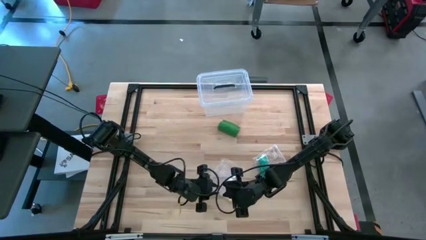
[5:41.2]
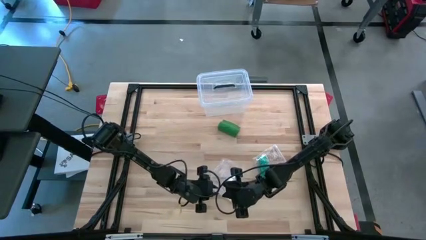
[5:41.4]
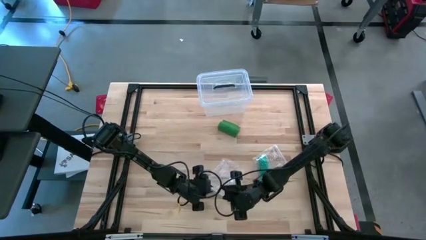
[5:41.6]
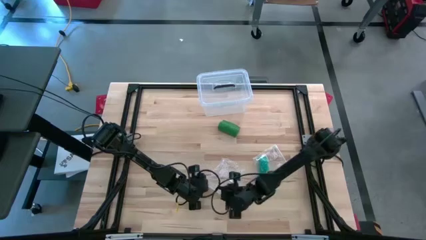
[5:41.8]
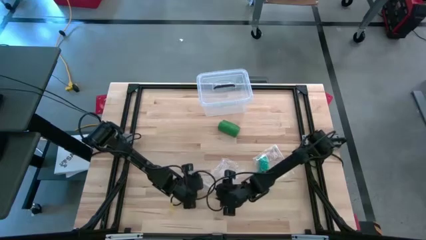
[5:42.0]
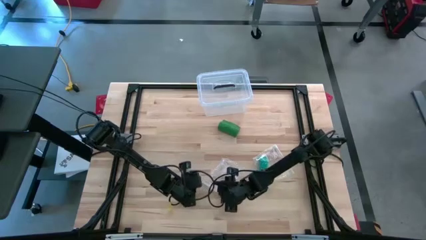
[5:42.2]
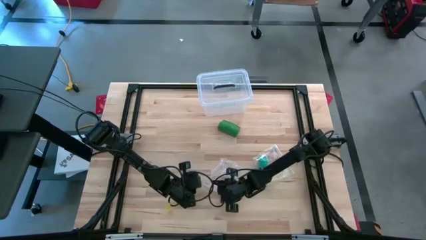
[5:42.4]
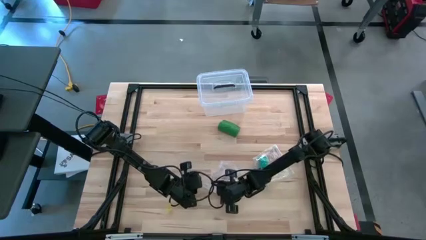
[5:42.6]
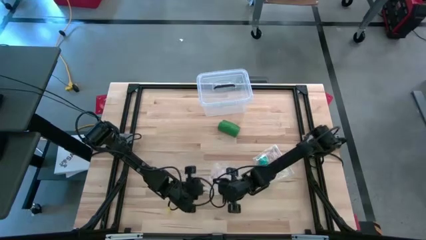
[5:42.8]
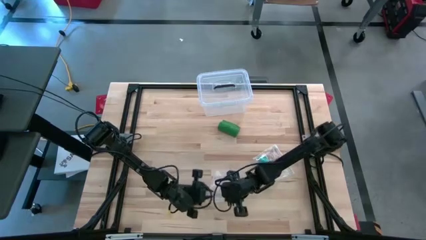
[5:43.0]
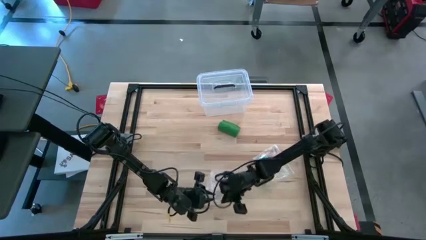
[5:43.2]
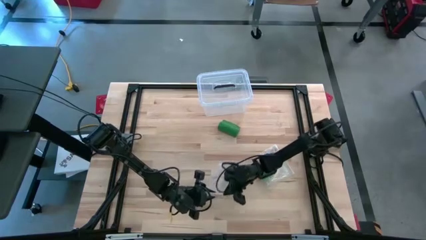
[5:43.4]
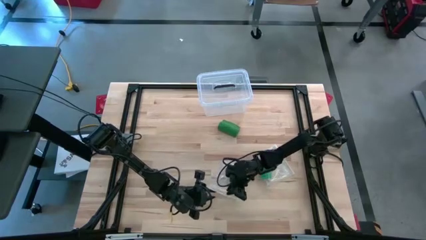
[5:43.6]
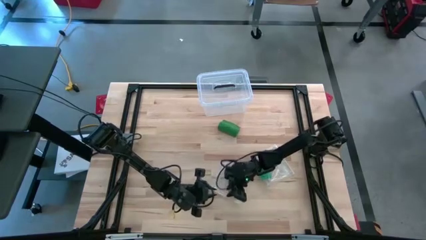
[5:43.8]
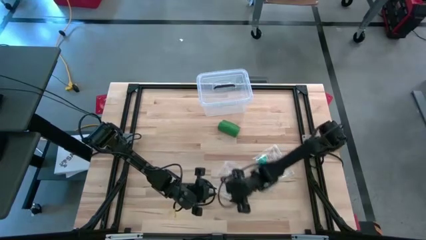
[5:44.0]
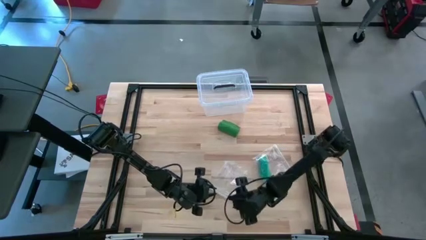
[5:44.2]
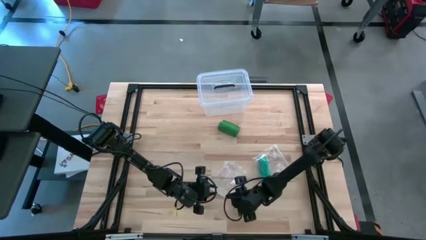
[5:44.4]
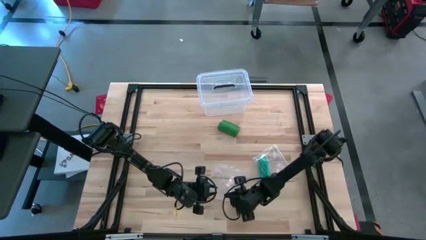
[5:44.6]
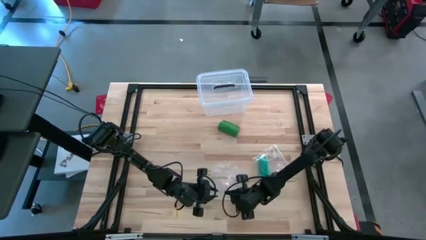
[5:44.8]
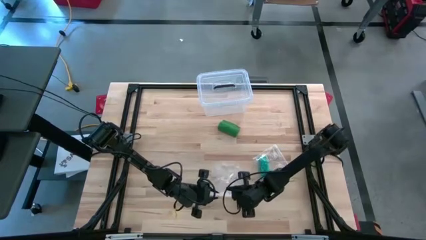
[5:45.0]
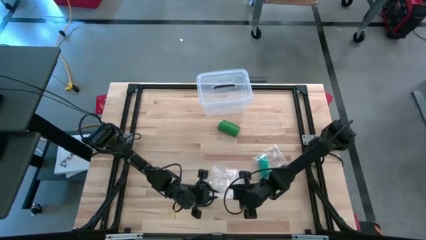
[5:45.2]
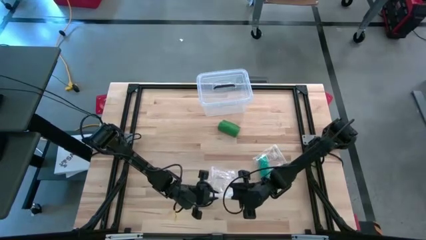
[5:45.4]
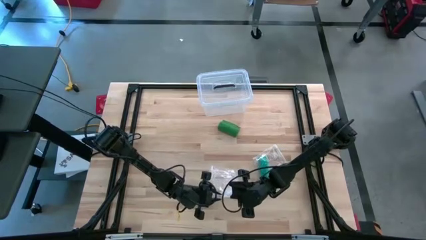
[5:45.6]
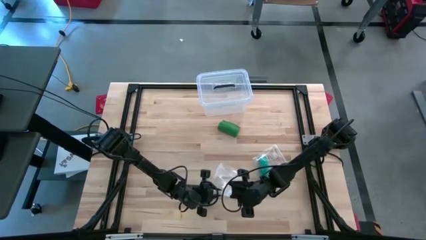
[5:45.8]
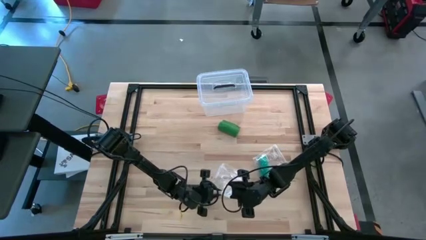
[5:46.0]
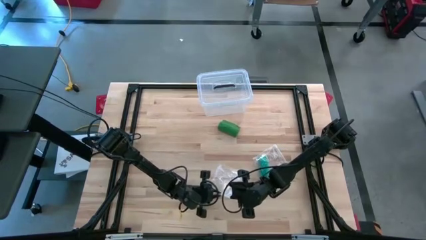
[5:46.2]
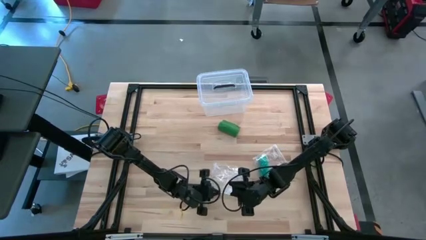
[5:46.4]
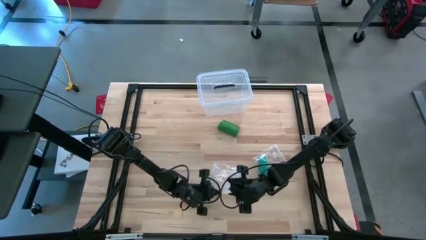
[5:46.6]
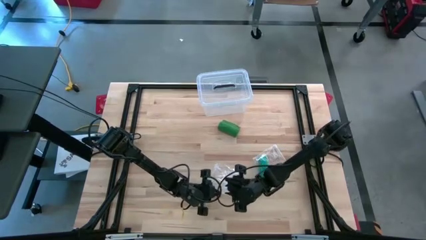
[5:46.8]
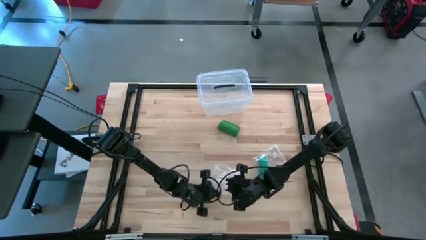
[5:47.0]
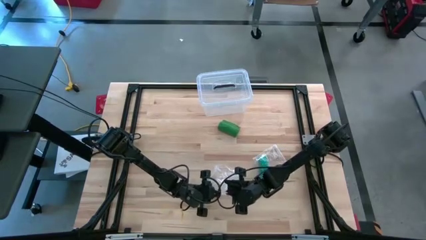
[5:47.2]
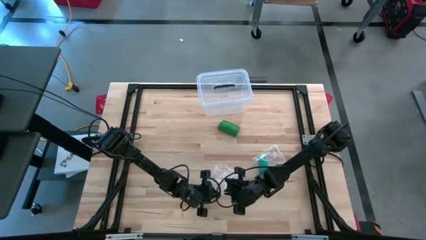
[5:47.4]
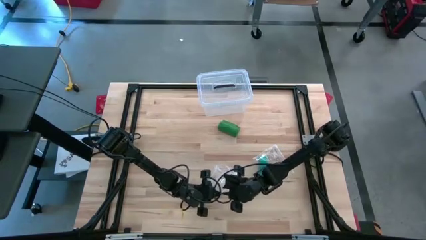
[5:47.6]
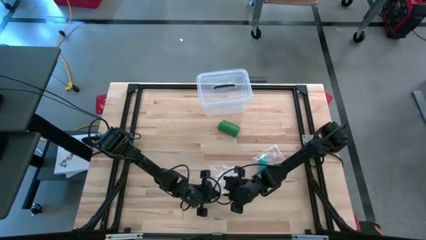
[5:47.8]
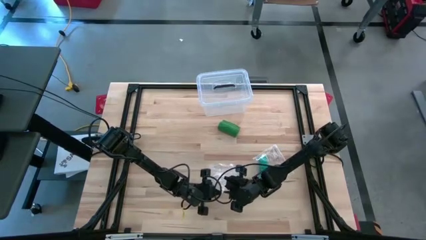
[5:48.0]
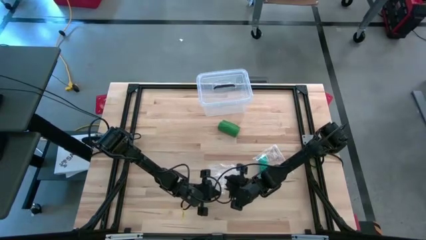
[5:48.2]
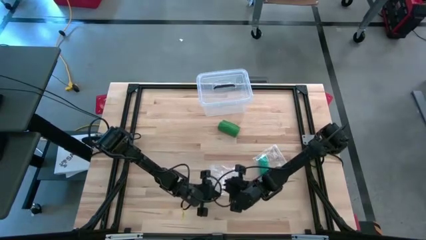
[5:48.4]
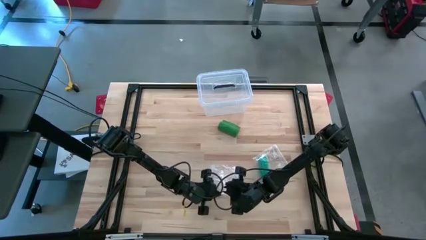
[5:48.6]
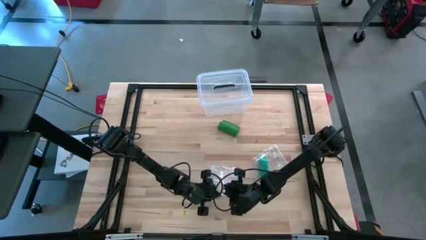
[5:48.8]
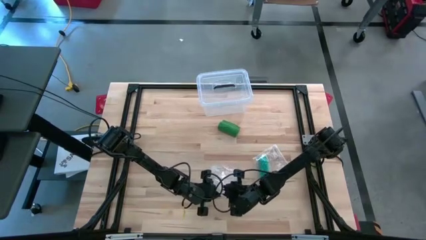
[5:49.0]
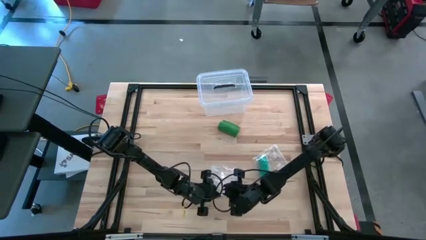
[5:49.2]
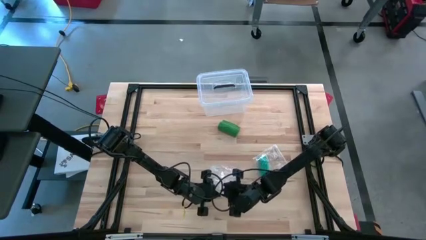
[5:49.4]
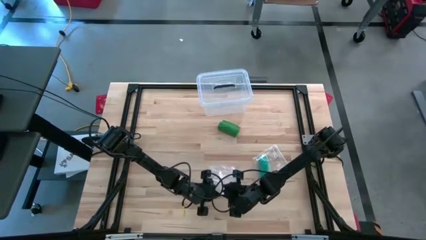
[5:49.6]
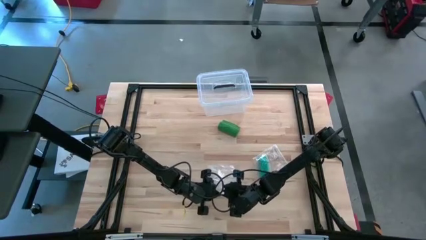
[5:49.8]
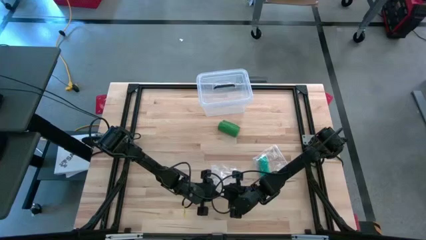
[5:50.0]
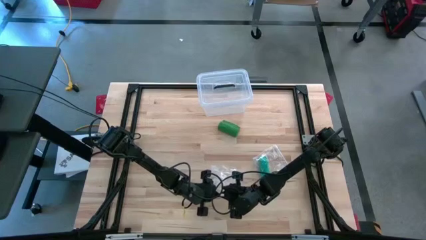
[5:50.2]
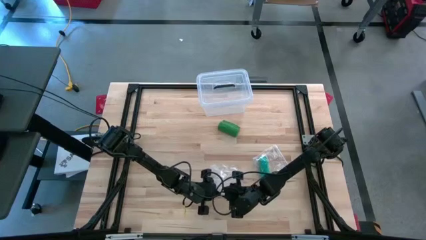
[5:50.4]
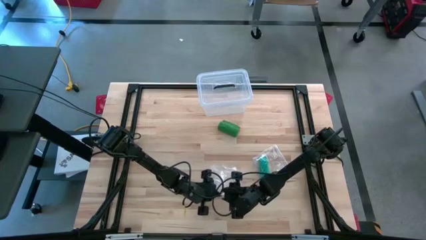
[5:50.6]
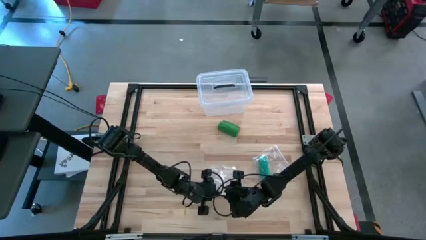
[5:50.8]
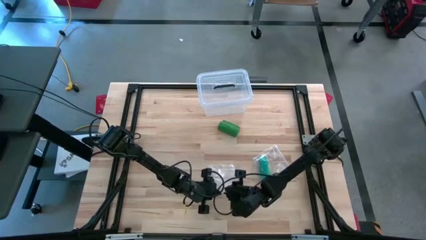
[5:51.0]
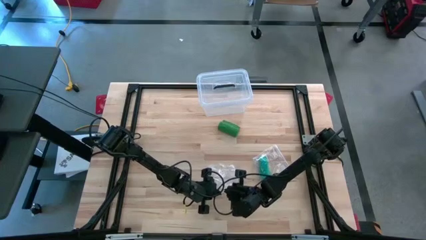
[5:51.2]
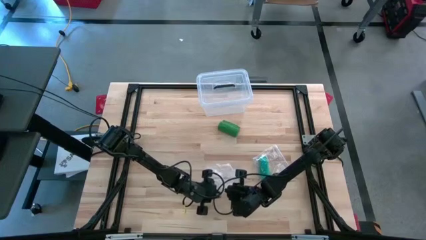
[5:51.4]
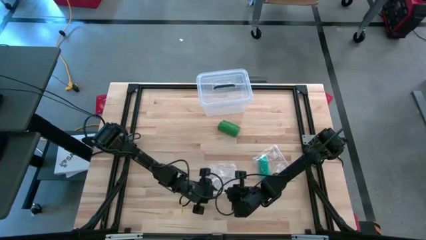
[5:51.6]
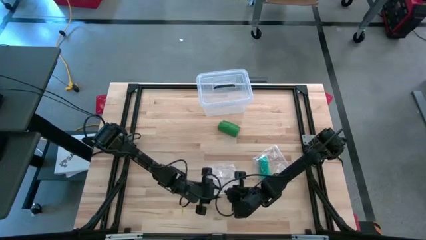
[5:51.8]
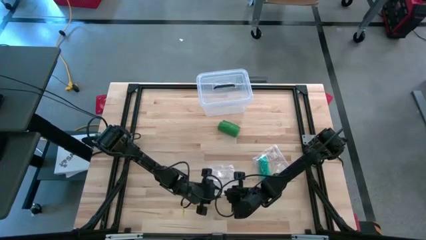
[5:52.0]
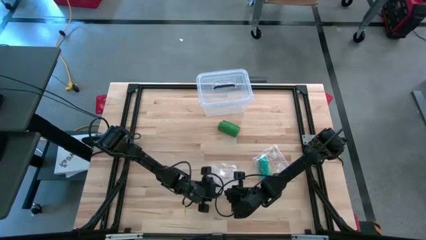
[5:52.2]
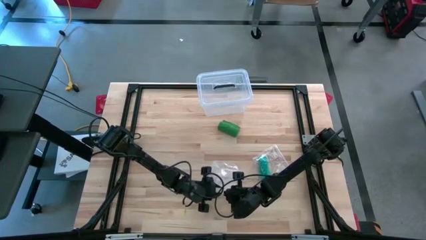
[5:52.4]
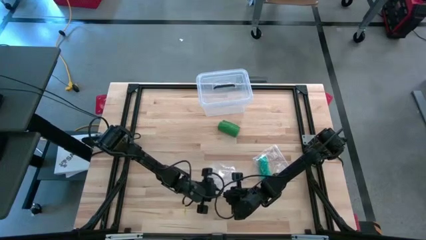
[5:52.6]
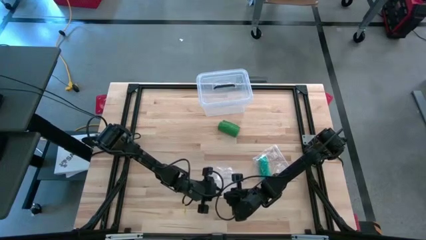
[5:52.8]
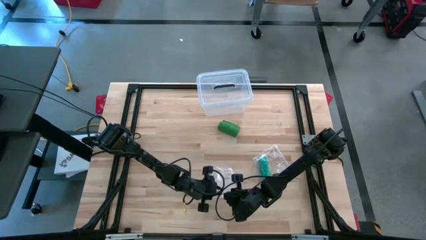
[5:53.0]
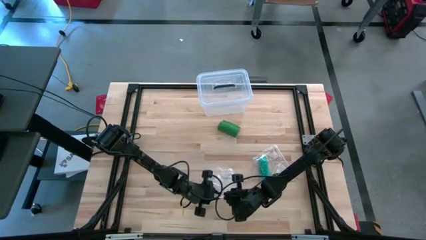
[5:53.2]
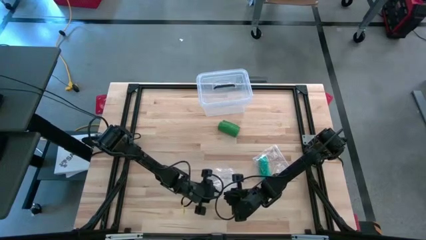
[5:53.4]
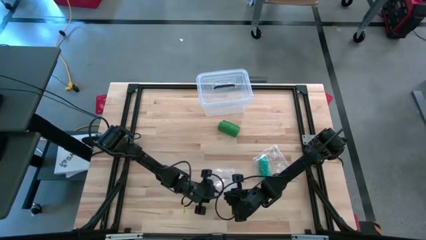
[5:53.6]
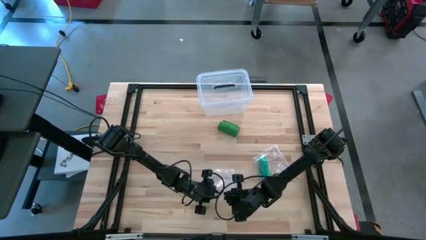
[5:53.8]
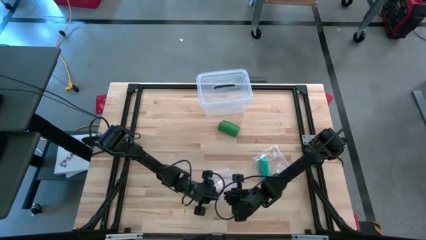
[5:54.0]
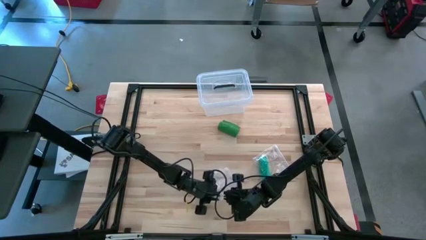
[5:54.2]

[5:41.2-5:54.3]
Task: Roll bandage
Put the rolled green bandage into the transparent zip bag

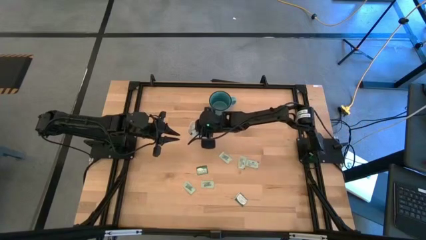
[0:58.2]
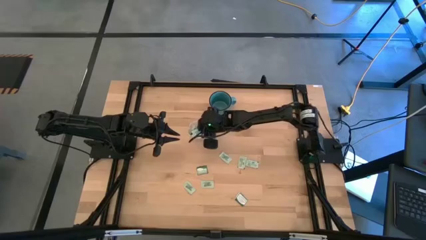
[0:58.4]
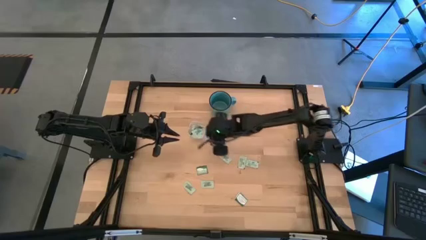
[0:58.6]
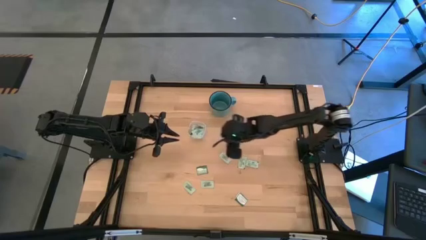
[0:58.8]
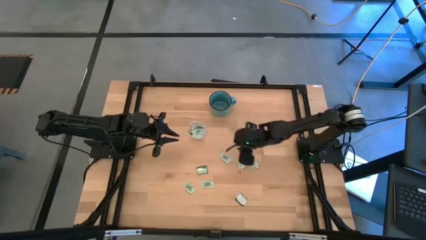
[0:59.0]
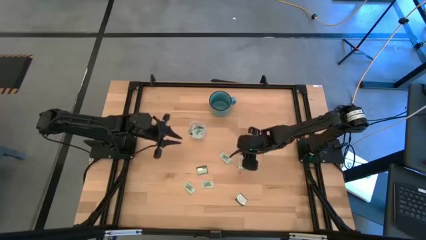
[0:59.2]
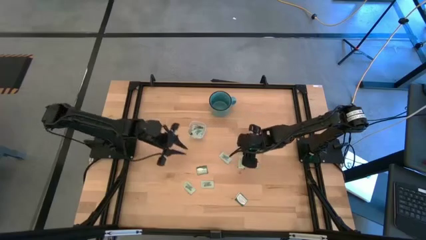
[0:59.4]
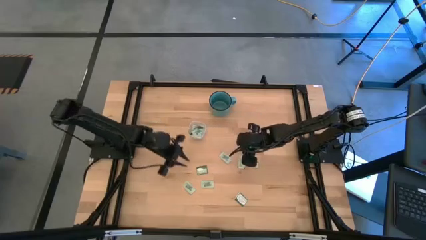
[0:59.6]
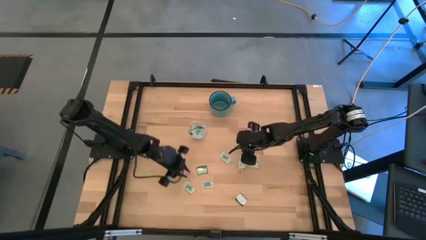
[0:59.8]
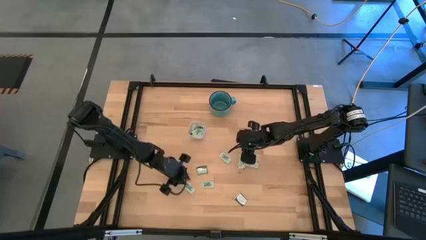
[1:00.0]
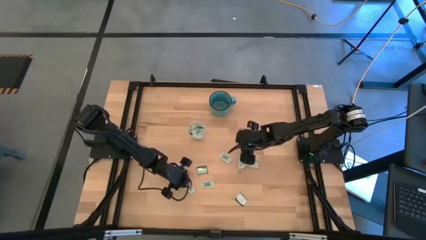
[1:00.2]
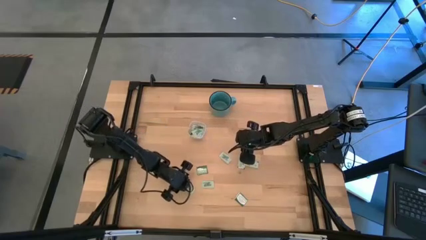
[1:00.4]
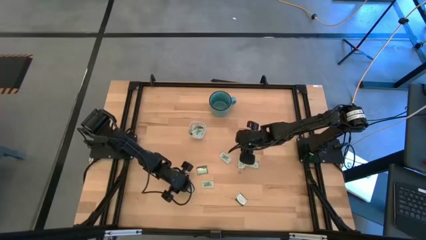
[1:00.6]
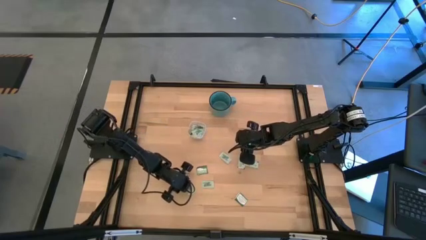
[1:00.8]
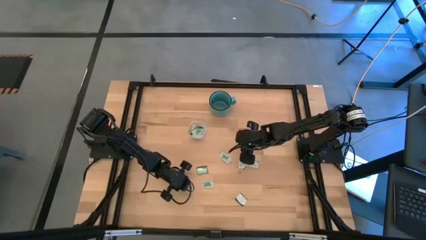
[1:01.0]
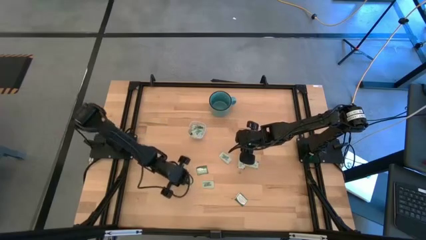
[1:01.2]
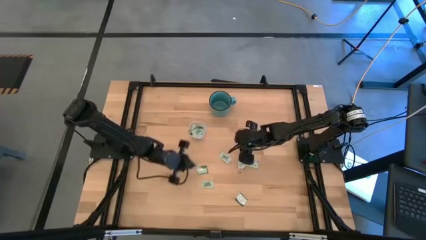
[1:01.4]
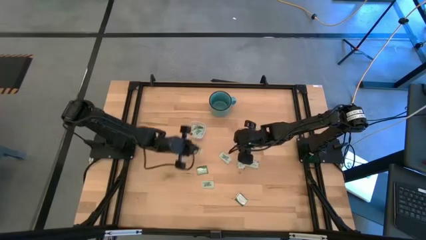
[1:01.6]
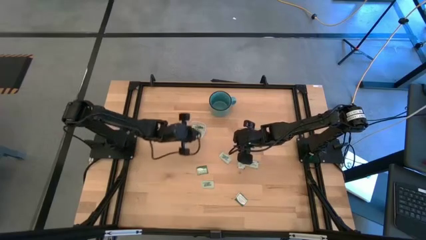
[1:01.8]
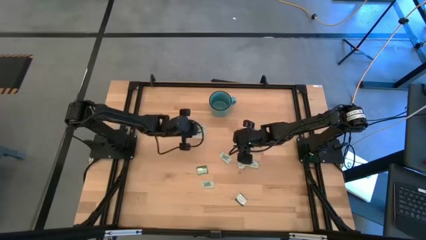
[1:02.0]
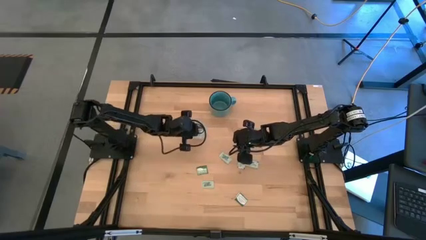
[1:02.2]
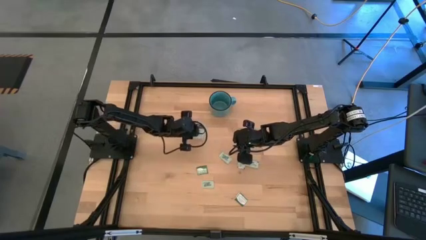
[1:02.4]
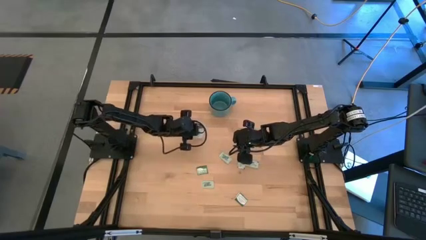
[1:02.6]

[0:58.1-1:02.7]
Task: Pick and place Stevia / Truvia into bins
Put the green stevia packet into the transparent container
